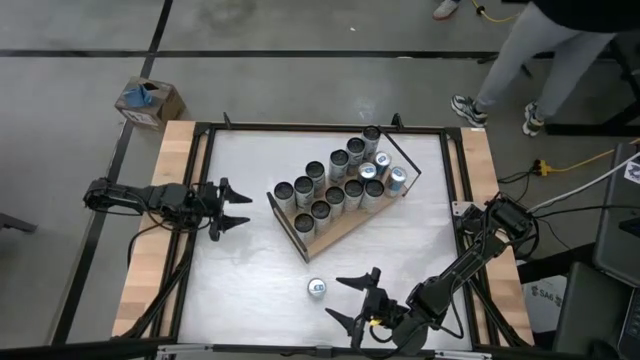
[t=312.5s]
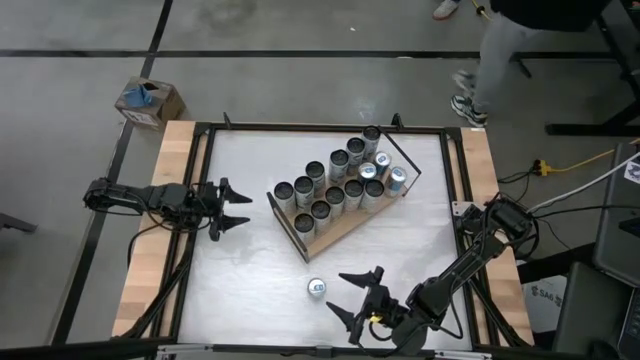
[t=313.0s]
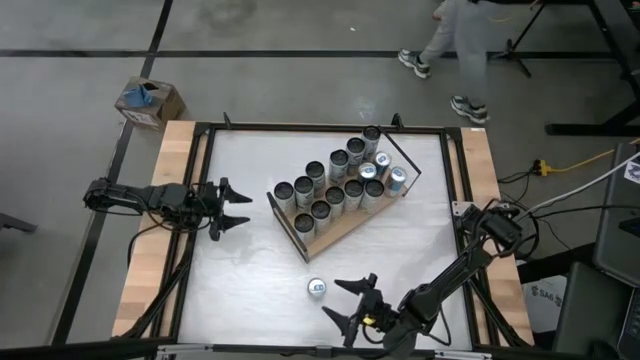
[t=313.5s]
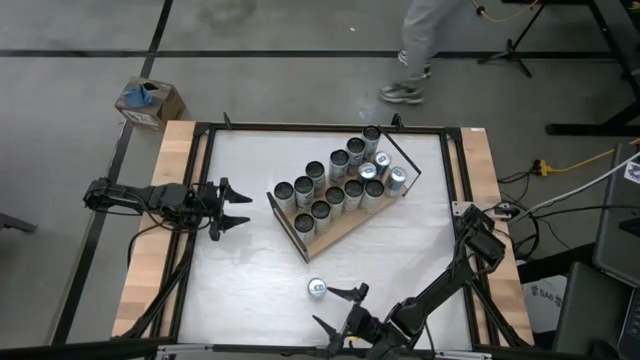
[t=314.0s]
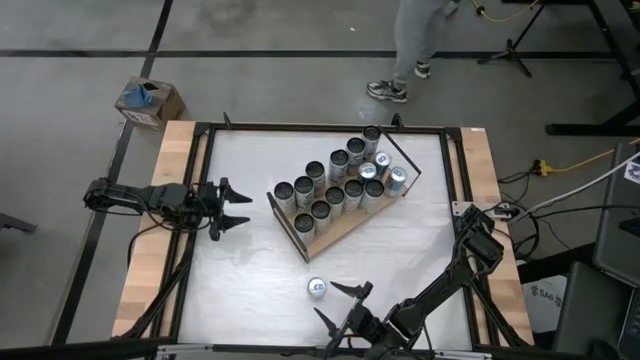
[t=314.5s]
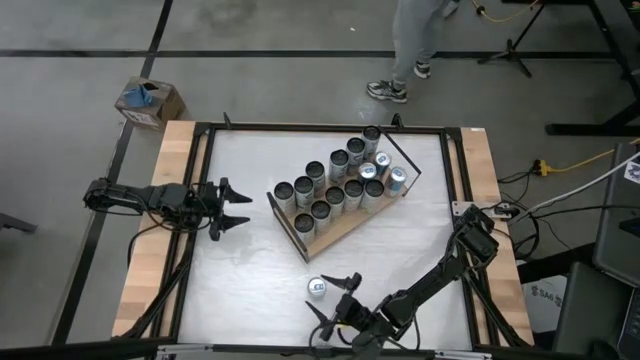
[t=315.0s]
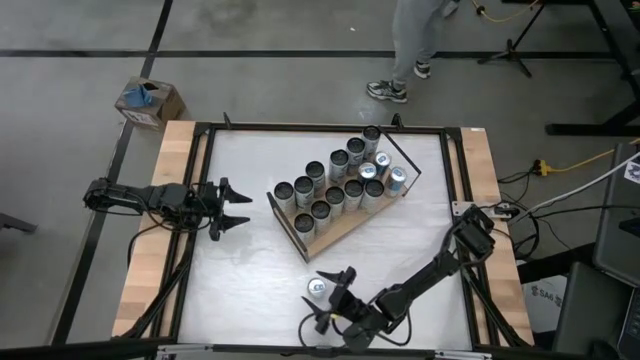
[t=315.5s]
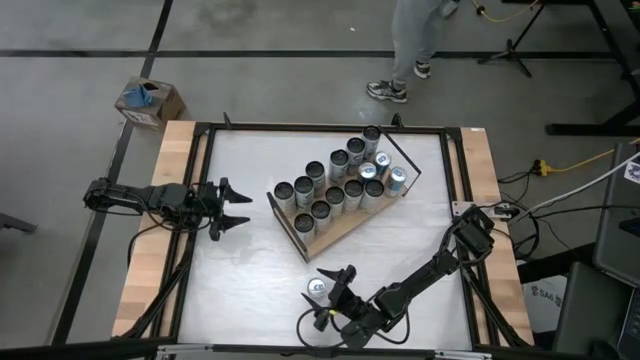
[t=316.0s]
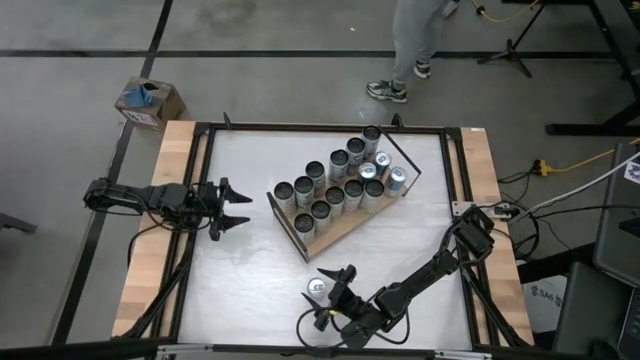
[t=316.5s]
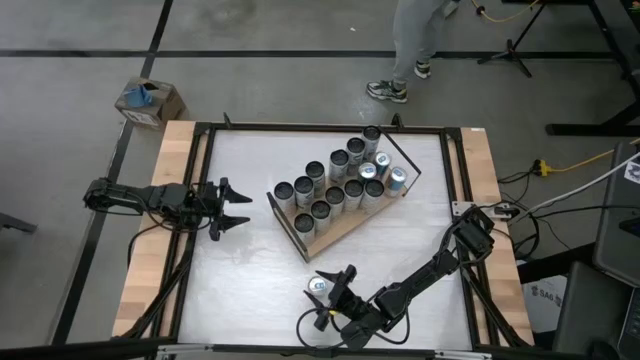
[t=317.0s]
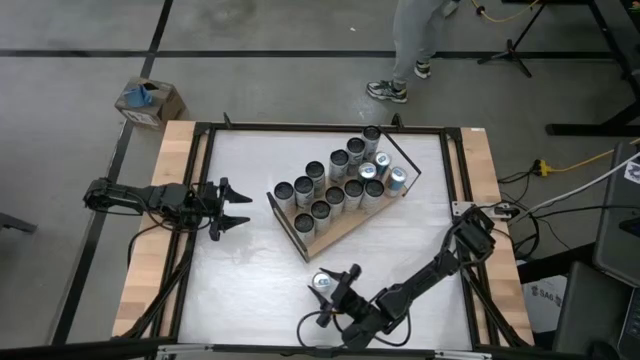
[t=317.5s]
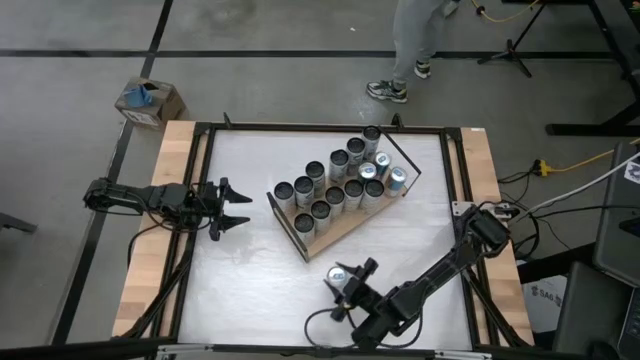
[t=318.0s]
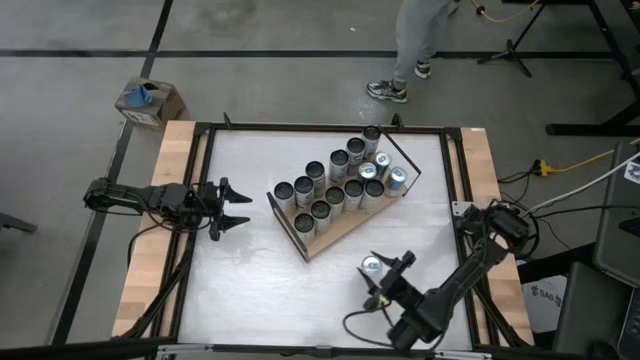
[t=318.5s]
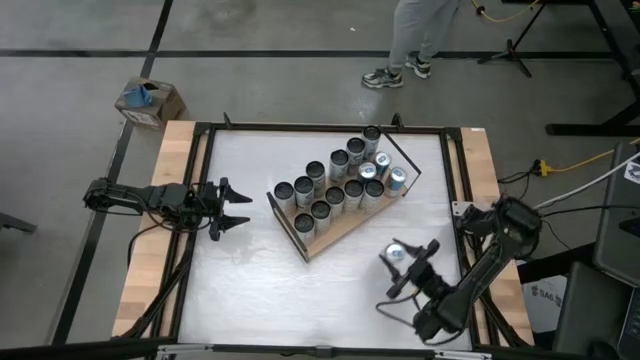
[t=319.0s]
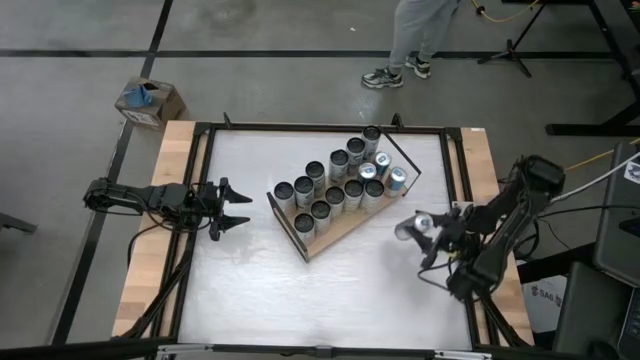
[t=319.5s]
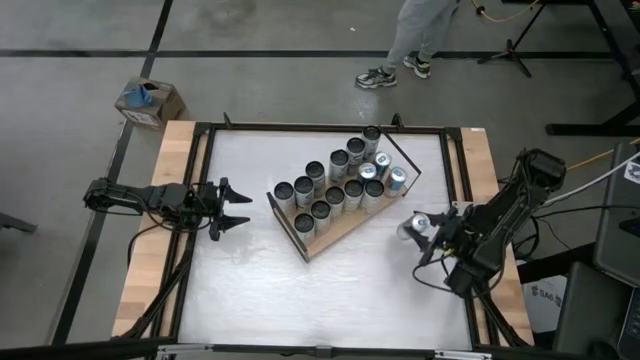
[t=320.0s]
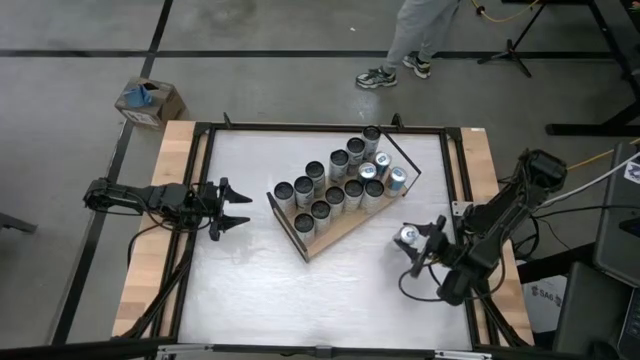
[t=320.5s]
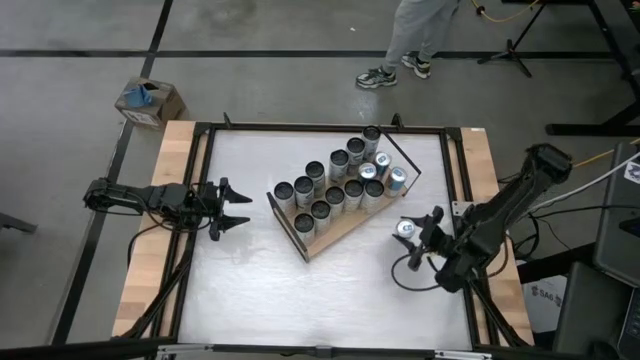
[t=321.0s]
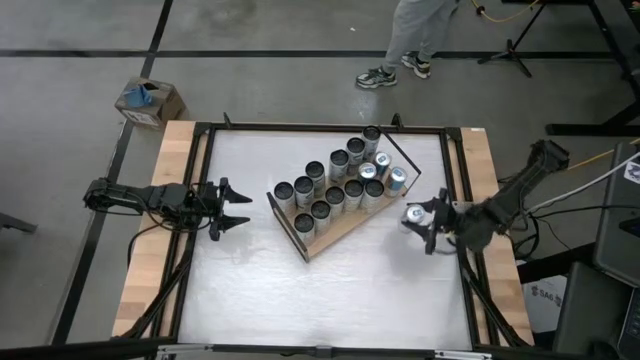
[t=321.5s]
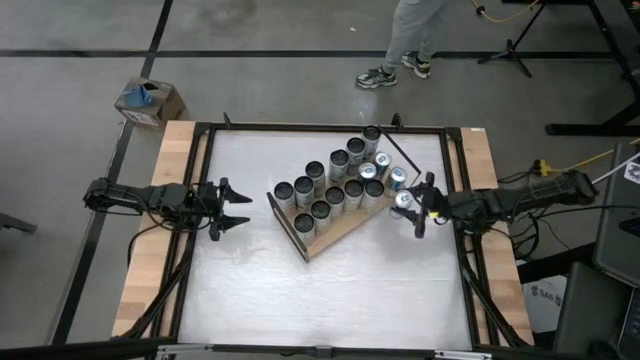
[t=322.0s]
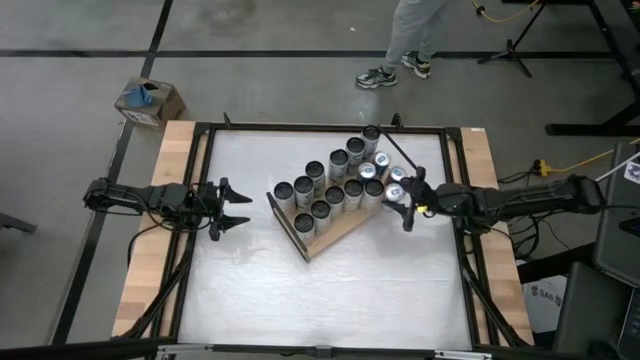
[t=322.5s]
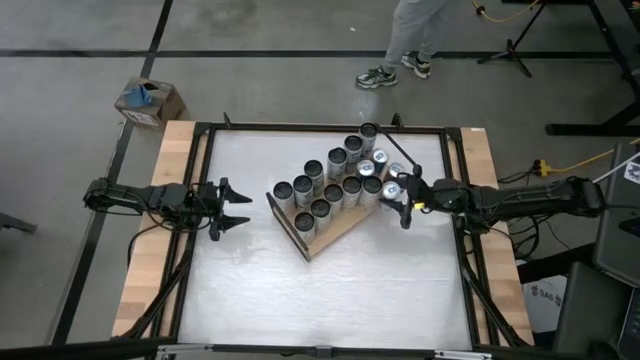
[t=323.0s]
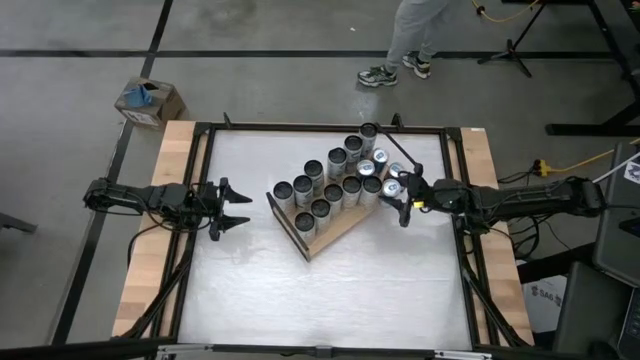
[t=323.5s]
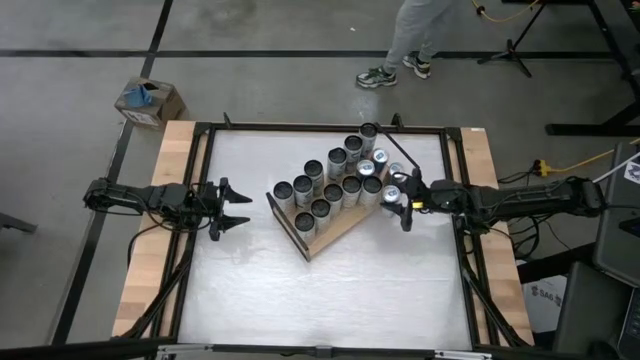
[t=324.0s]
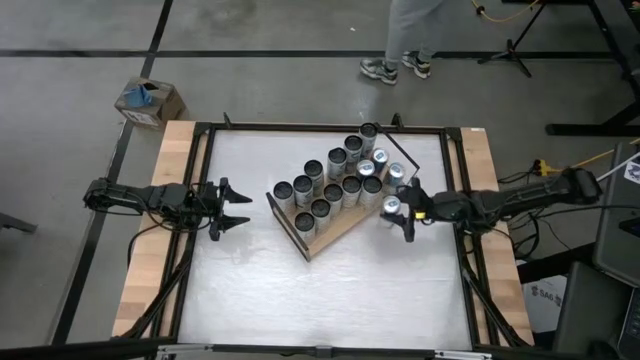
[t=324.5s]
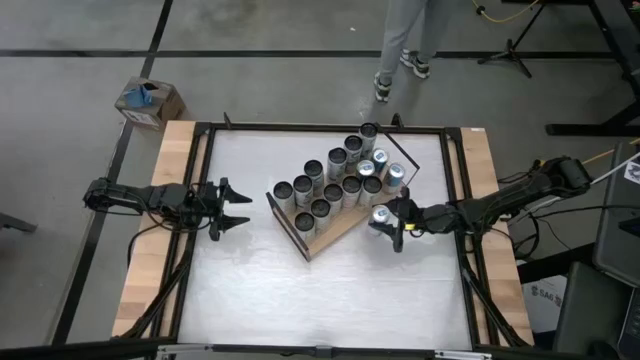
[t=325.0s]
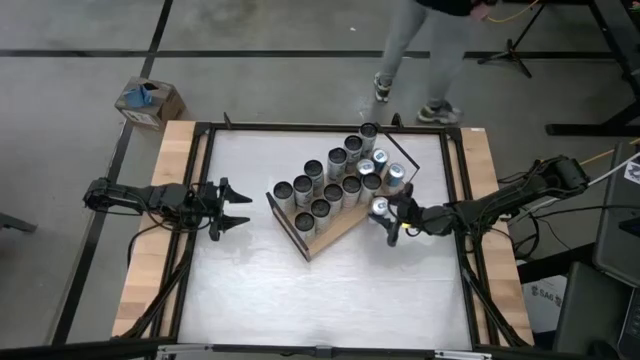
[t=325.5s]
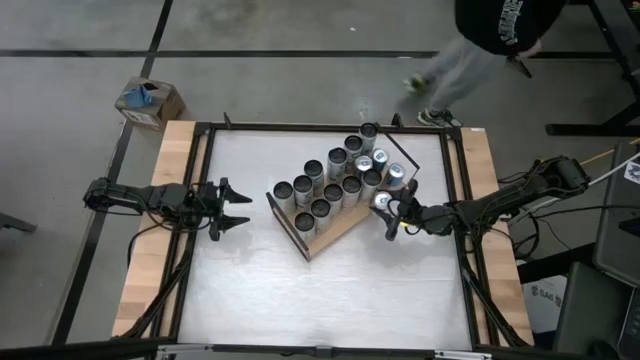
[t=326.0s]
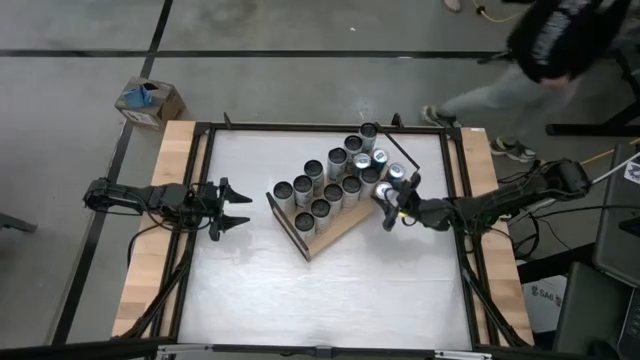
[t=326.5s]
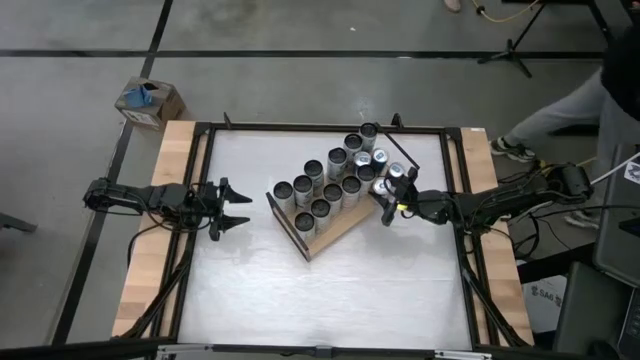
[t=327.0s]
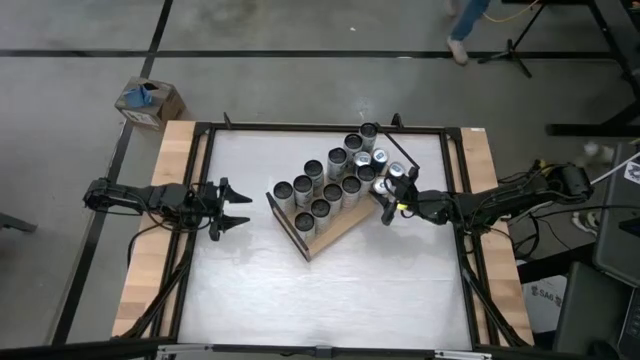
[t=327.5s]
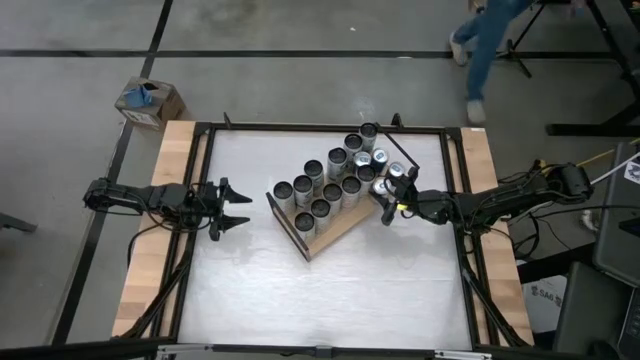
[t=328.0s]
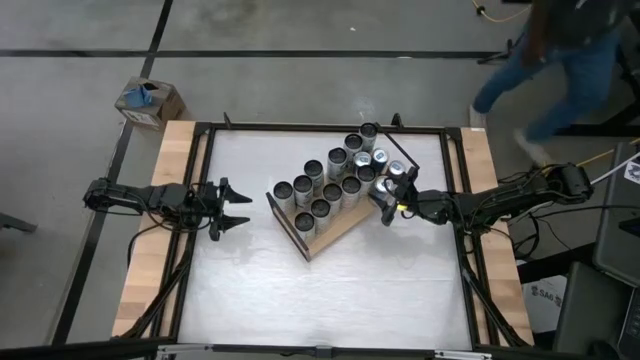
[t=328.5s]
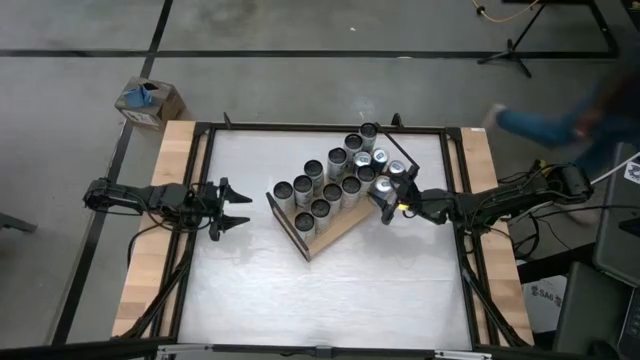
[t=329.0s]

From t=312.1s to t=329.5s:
Task: Place canned beverage on shelf
Put the blue soda can on the shelf

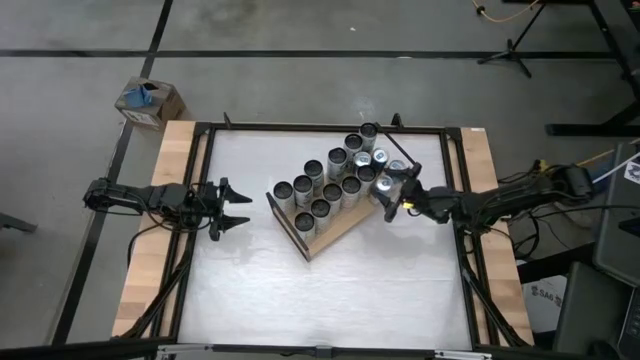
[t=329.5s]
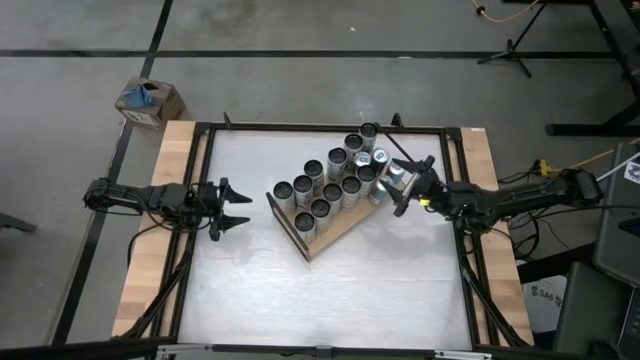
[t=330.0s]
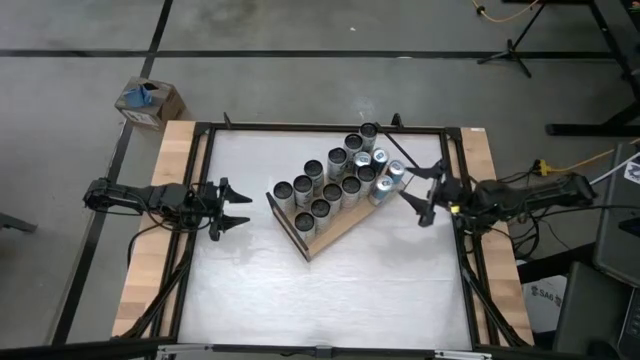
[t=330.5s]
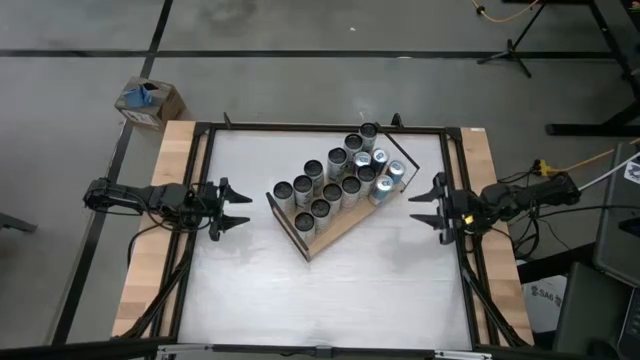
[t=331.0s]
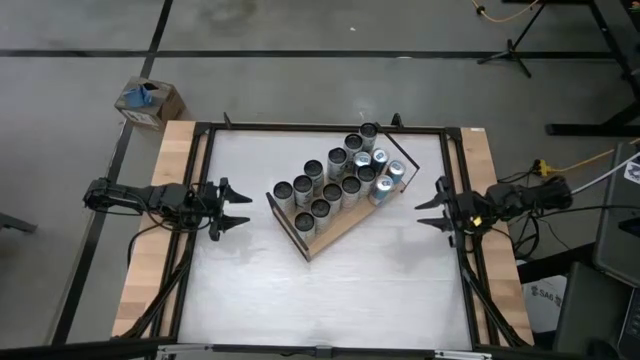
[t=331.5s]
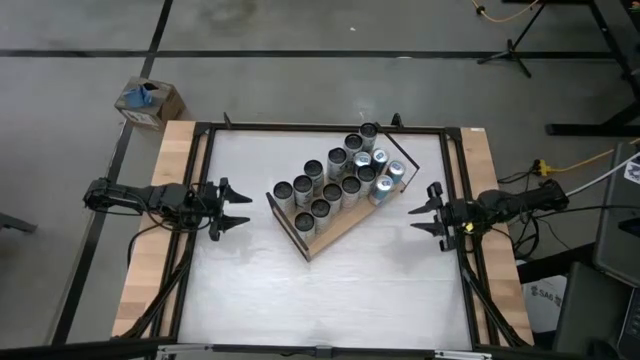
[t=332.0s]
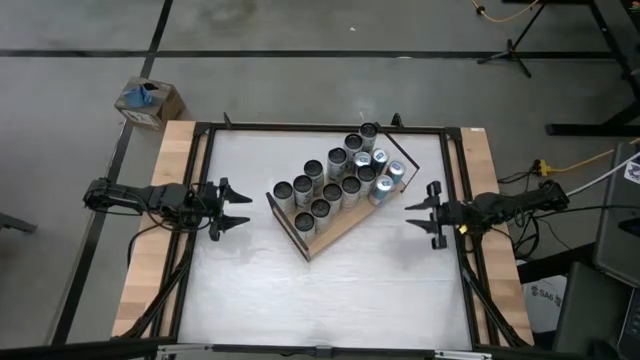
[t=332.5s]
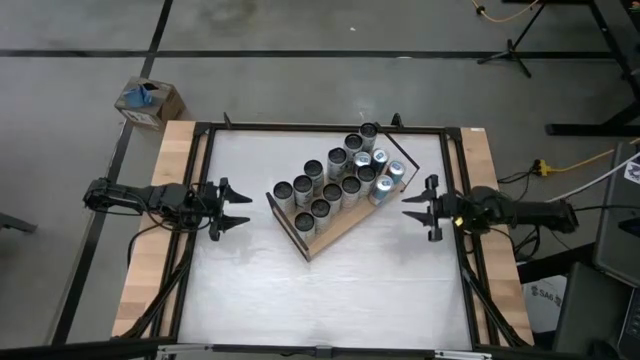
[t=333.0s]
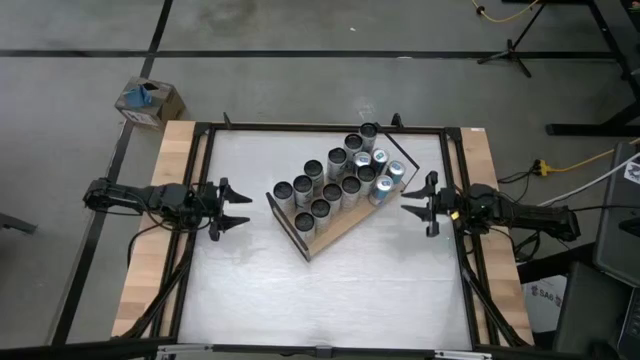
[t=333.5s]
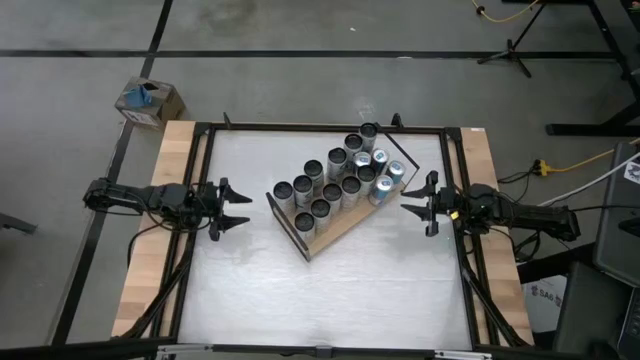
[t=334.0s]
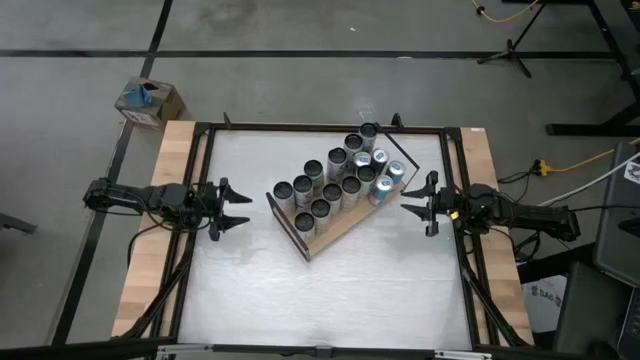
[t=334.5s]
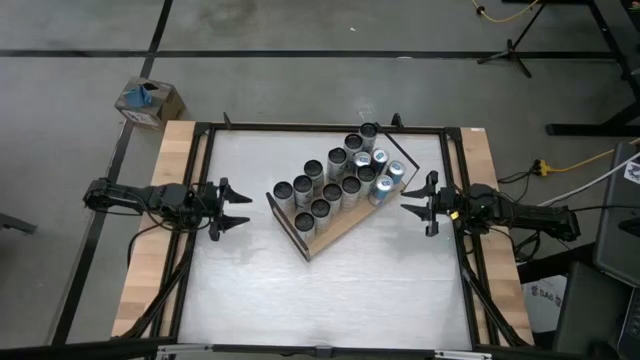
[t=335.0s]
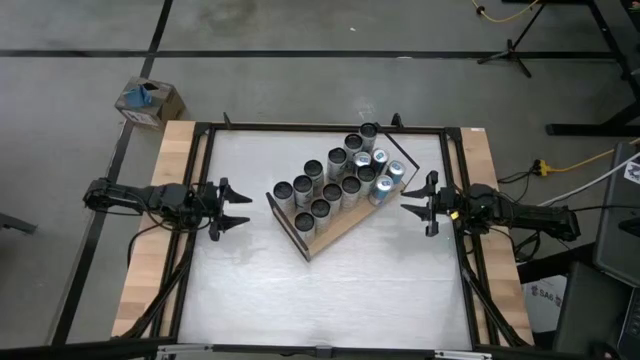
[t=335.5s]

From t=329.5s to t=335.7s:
Return to Home Position
